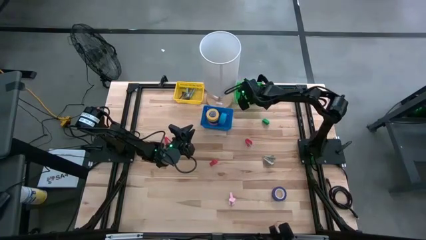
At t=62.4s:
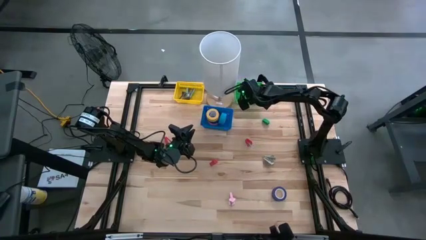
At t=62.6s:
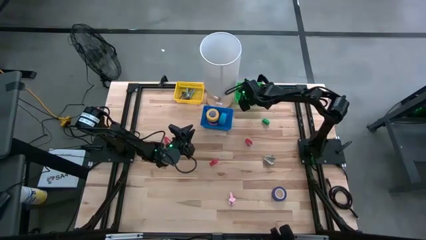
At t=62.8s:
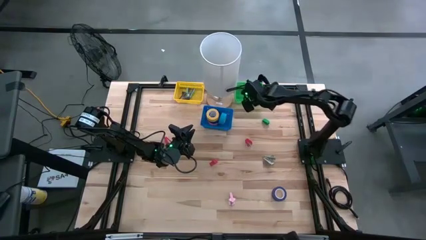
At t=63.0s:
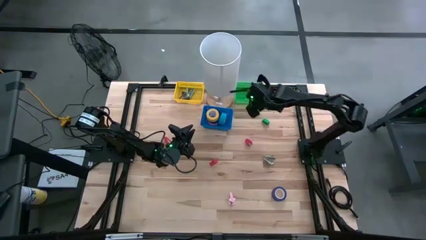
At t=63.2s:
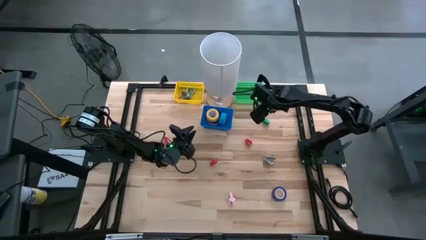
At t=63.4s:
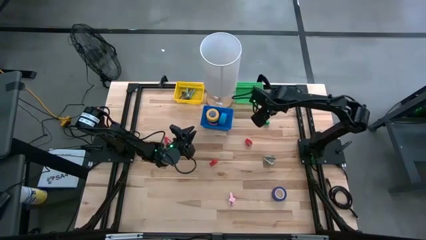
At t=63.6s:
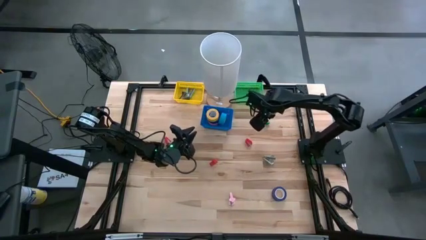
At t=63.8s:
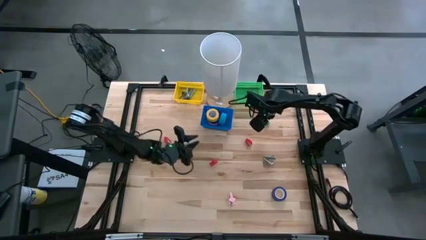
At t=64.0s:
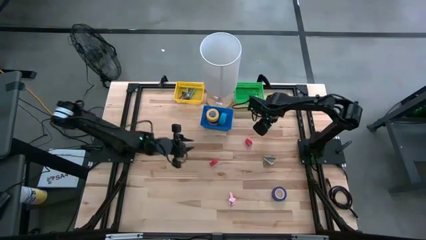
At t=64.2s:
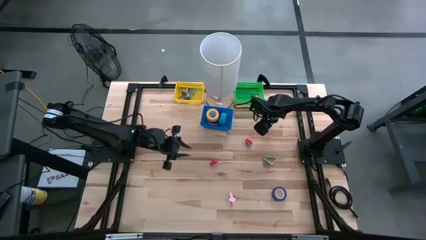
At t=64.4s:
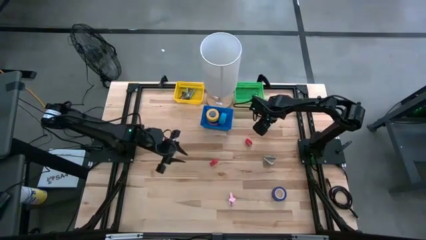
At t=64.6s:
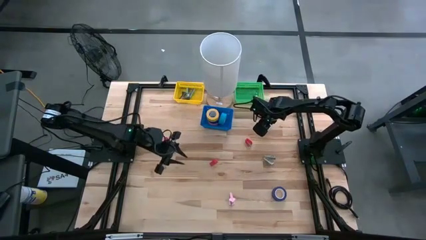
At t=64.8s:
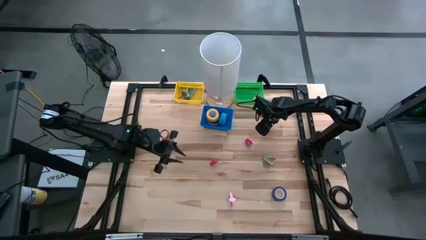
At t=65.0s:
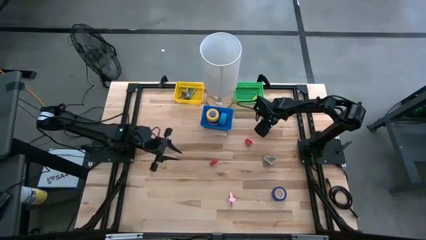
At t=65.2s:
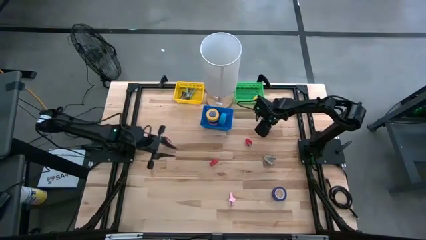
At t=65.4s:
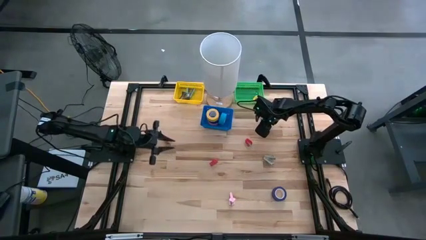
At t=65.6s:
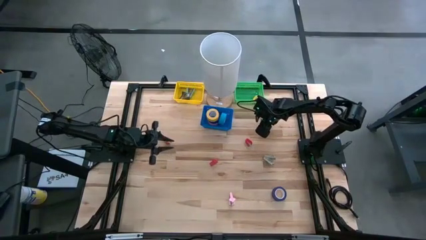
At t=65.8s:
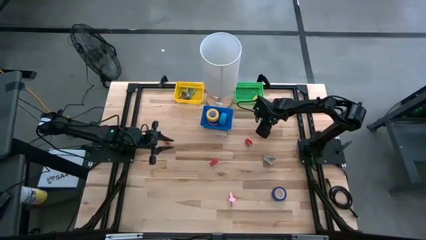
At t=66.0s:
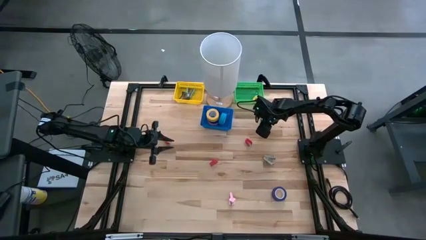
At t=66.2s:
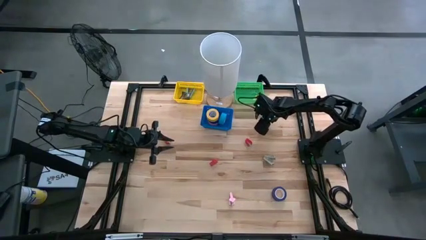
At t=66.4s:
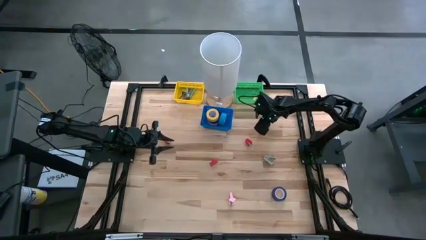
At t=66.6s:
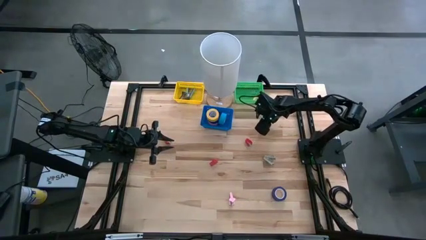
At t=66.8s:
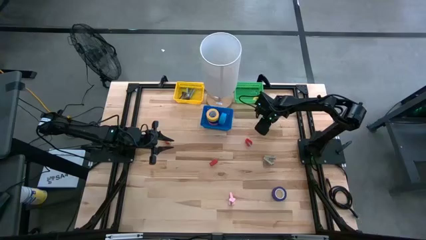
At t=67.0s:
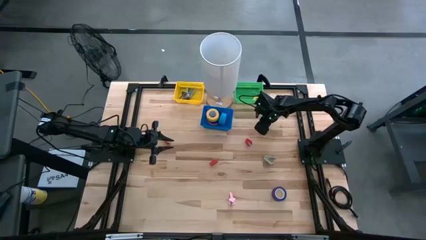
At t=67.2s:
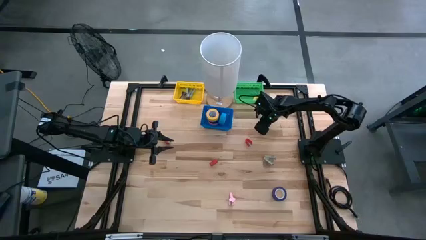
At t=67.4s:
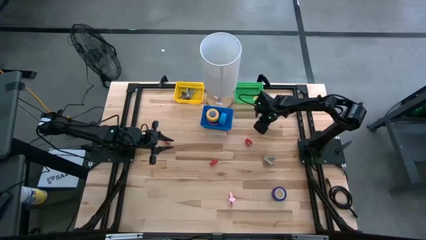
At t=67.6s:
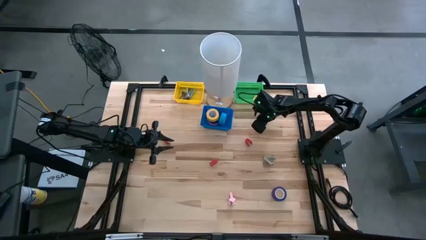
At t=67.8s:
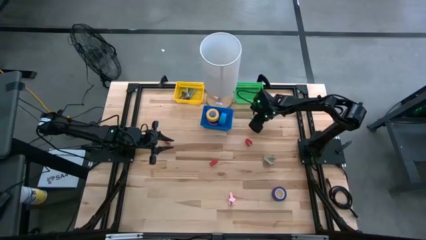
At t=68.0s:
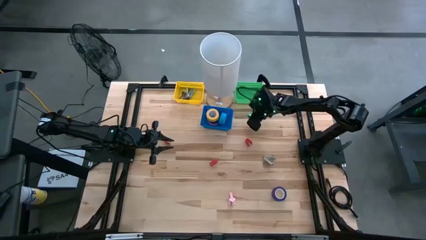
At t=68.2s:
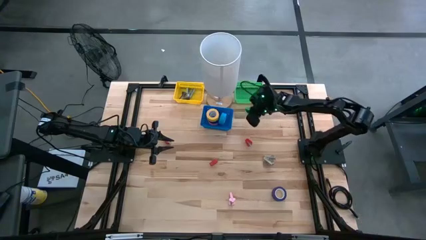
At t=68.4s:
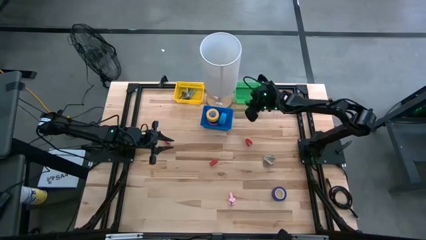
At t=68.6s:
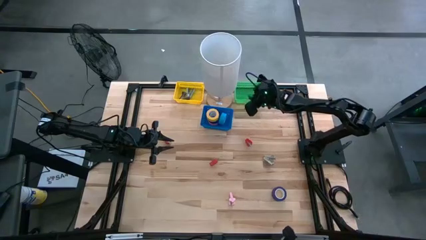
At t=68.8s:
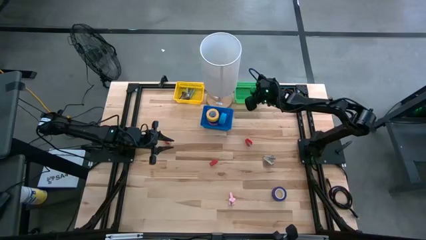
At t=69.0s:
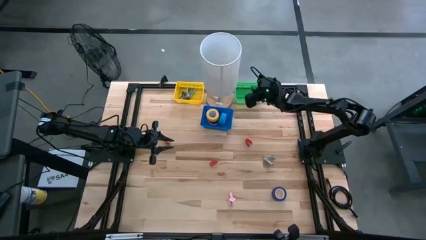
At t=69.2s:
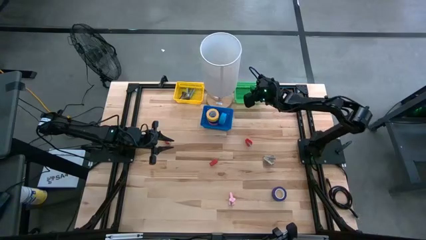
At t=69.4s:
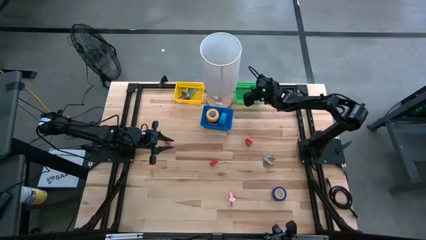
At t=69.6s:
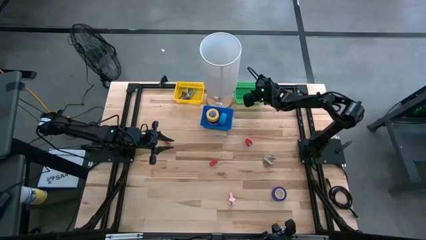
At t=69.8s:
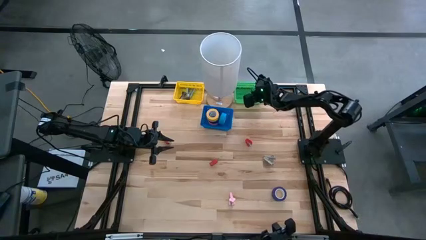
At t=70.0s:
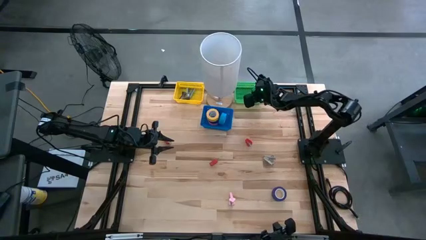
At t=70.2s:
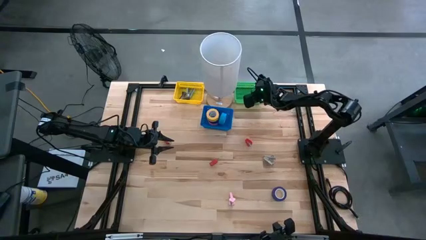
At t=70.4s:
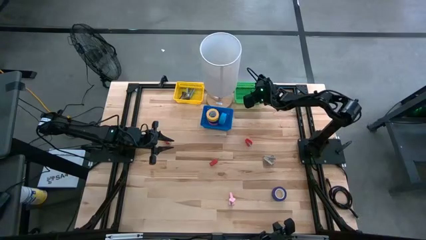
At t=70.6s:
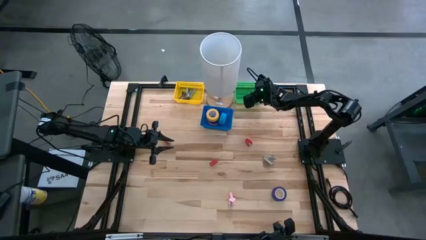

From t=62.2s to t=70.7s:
Task: Pick and place Stapler, Stapler remover, tape
Put the green stapler into the green basket

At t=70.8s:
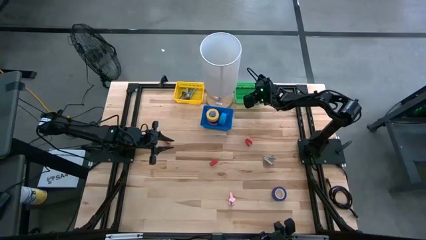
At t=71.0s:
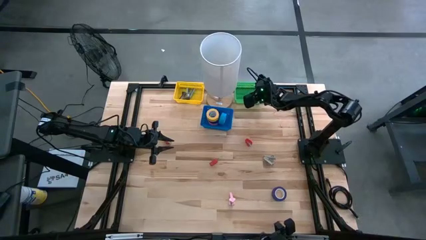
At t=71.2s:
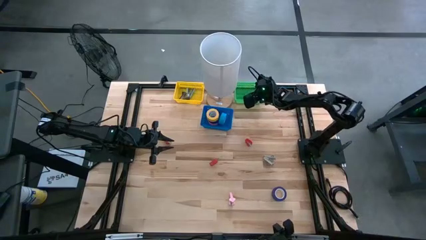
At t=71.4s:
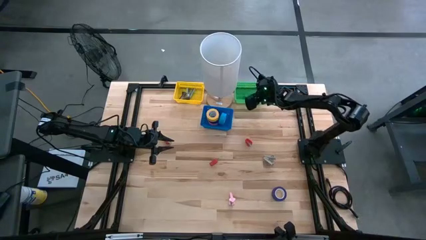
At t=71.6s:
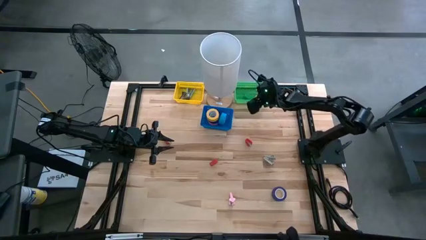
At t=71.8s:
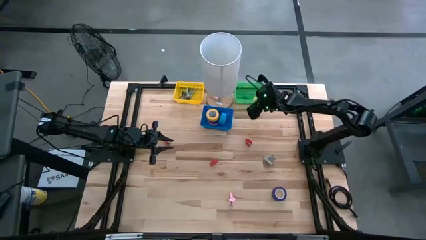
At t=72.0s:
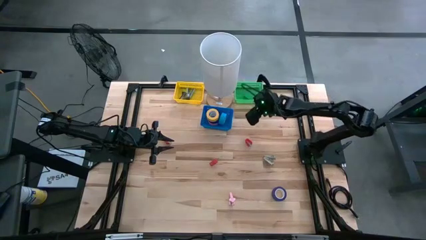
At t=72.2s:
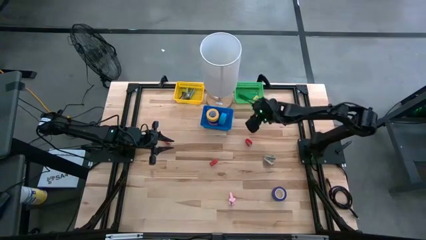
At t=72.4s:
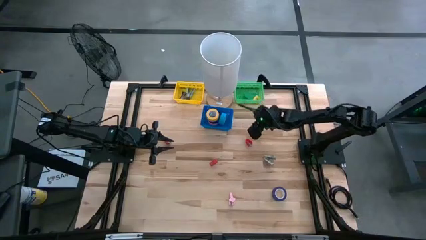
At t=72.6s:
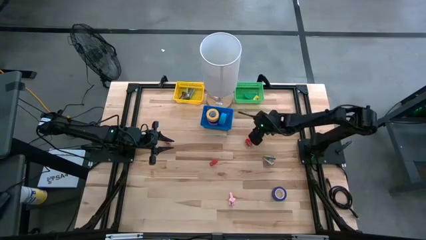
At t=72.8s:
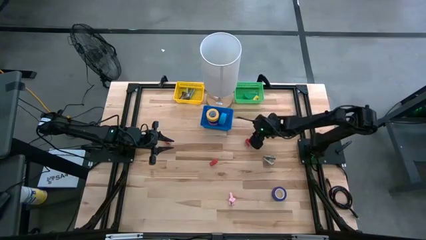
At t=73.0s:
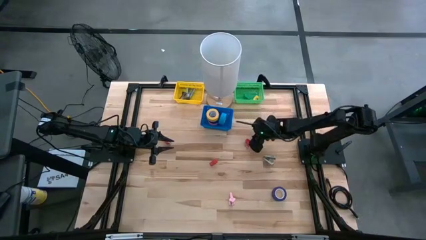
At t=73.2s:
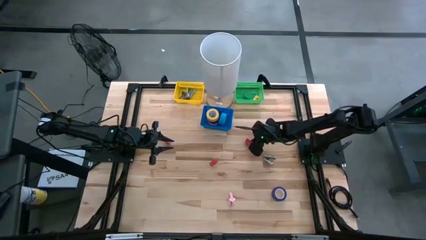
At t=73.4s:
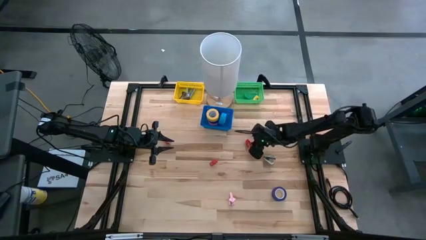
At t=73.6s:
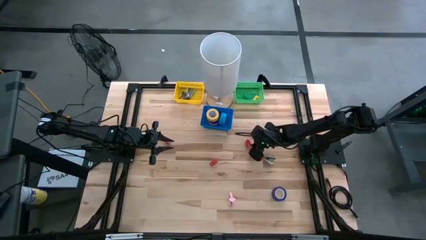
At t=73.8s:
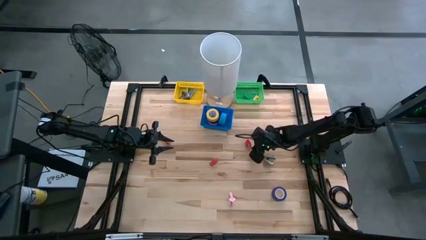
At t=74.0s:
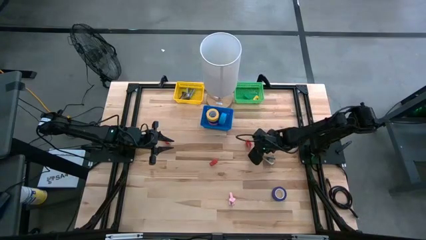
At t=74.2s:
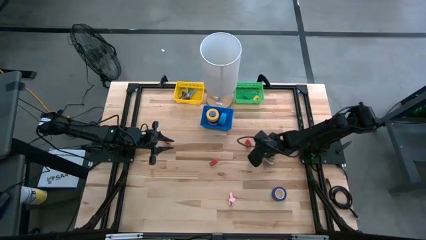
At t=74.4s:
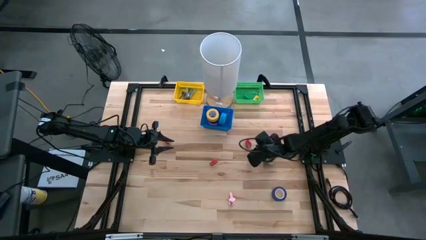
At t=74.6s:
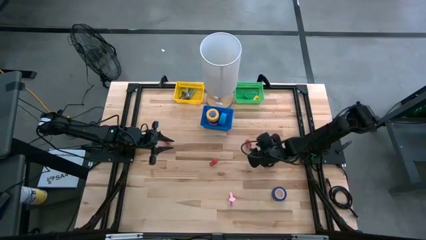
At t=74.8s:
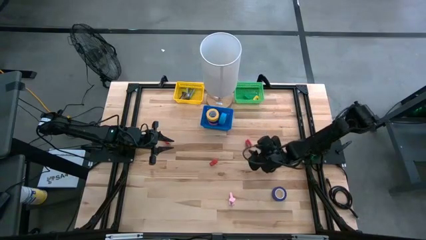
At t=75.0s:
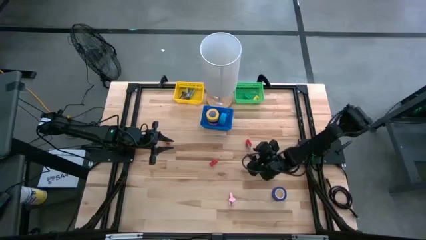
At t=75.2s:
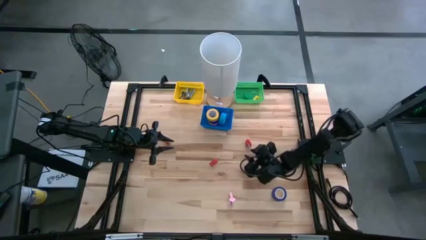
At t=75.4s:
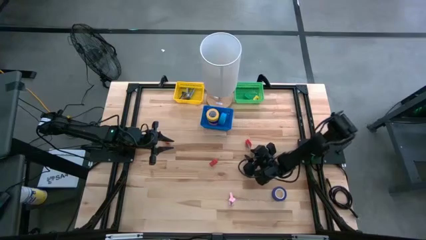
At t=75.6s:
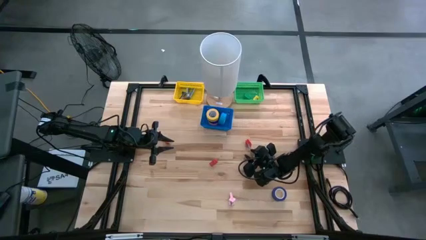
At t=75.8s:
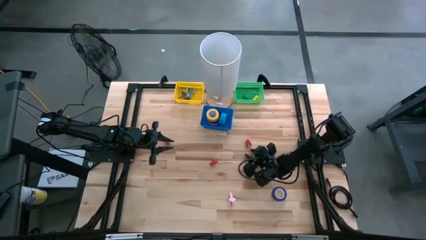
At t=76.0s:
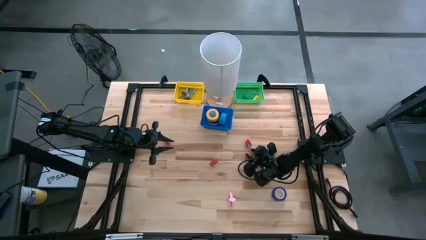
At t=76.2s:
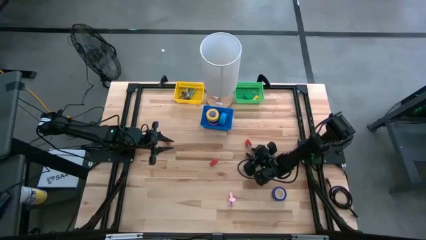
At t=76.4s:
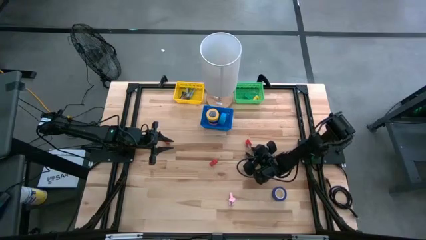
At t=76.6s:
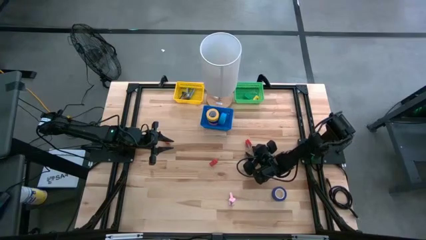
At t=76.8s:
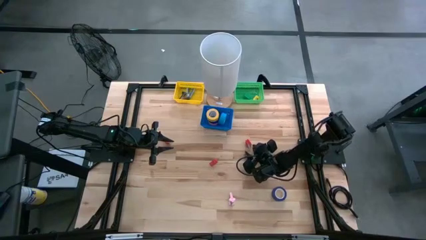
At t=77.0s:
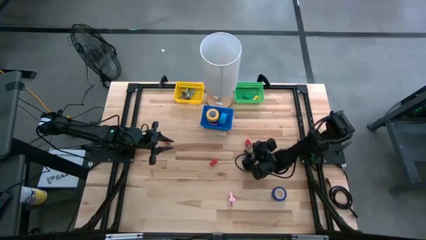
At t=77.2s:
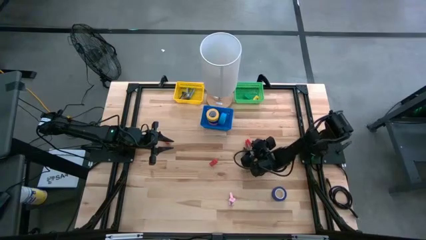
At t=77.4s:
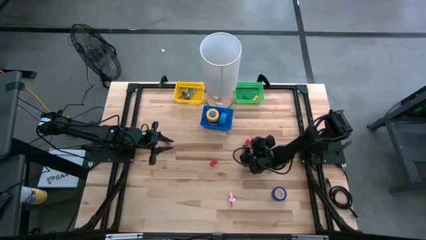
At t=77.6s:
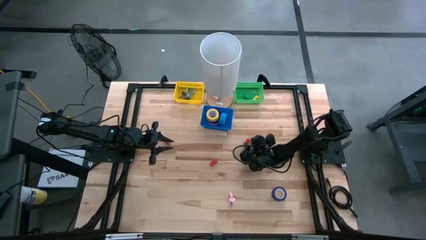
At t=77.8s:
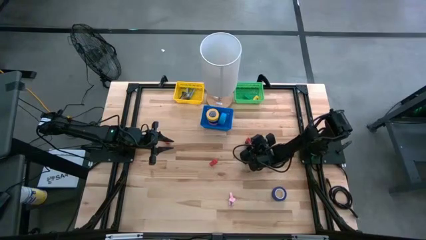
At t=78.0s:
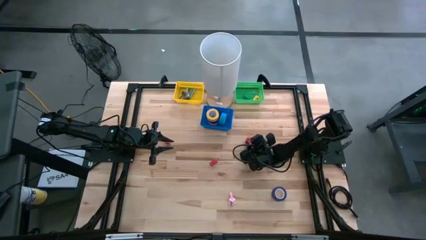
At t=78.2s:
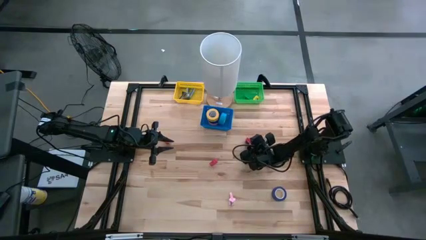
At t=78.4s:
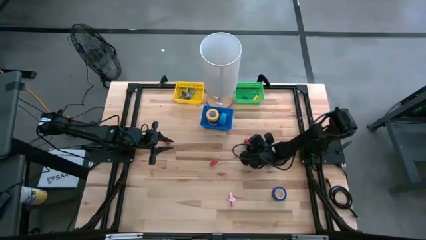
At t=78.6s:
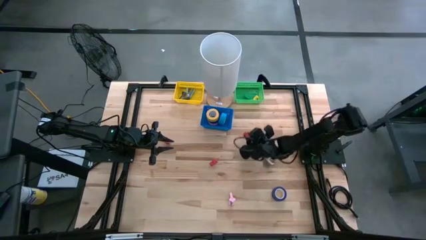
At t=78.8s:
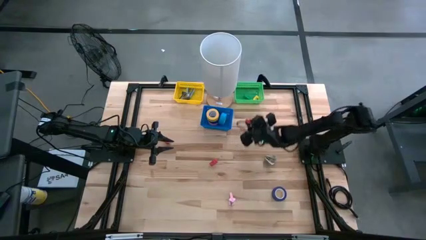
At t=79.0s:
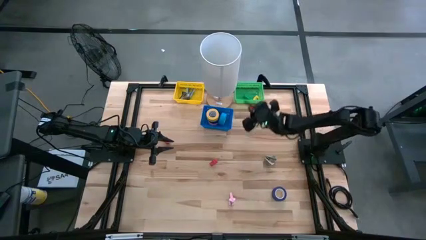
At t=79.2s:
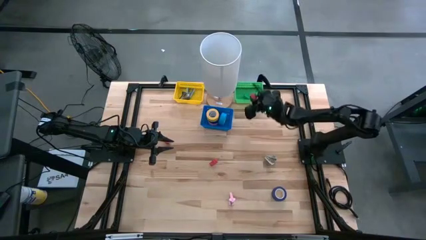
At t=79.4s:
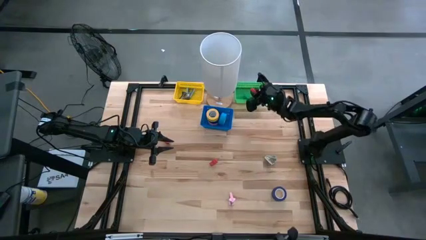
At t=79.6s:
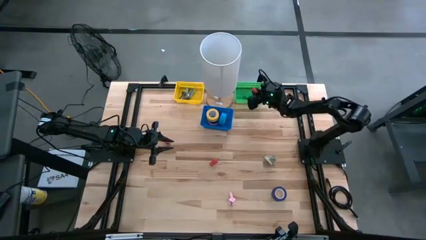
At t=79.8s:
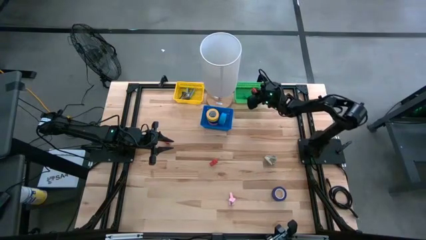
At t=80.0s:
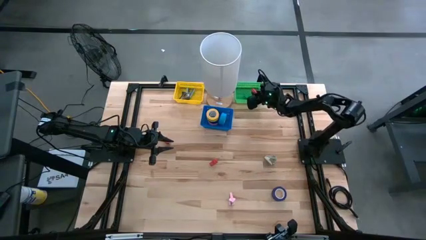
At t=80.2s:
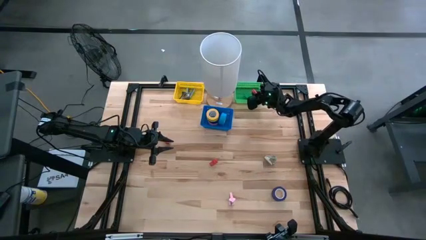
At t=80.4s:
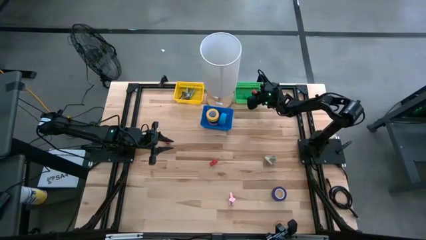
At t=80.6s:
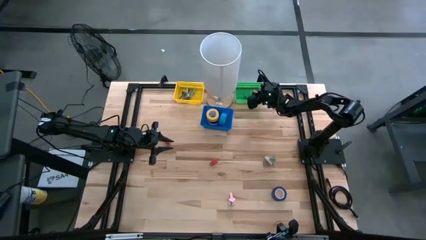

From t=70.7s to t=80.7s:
Put the right red stapler into the green basket
